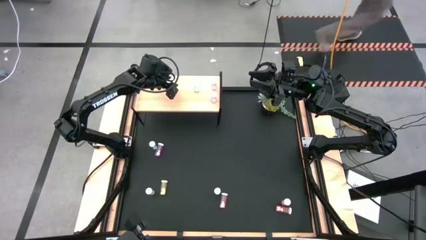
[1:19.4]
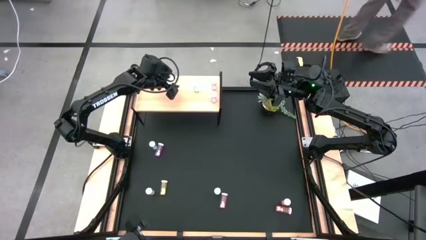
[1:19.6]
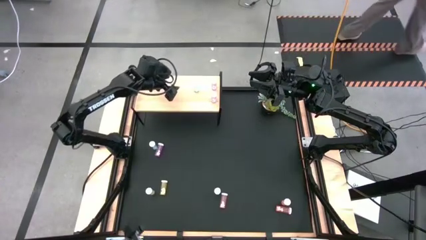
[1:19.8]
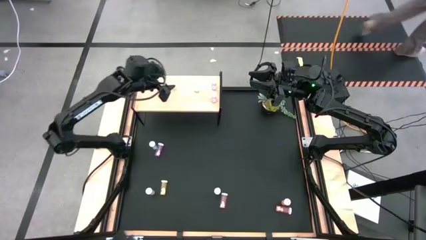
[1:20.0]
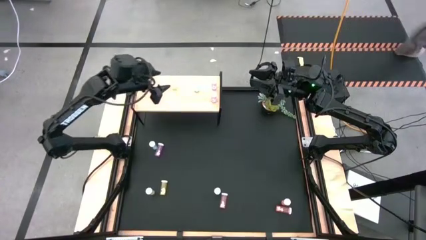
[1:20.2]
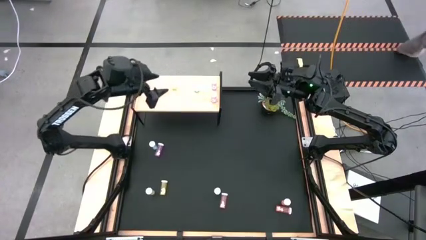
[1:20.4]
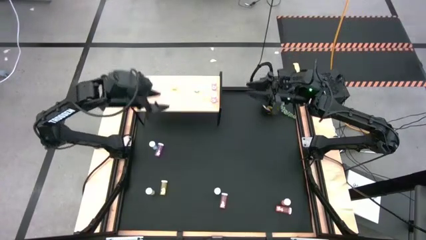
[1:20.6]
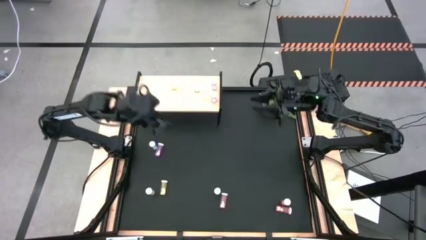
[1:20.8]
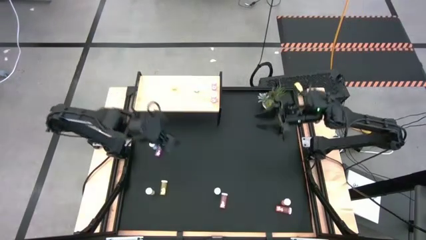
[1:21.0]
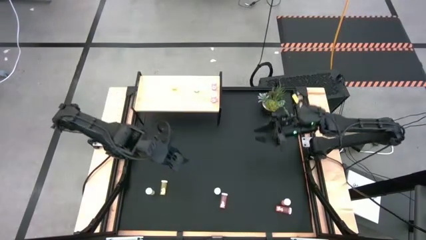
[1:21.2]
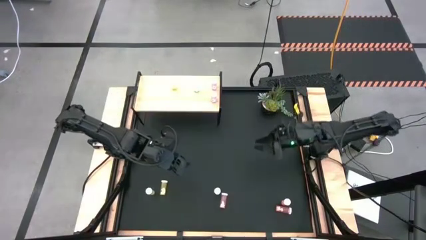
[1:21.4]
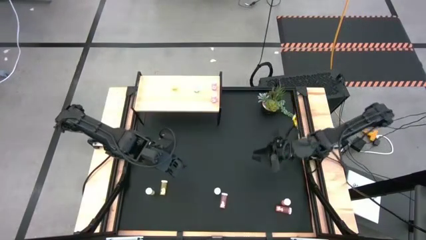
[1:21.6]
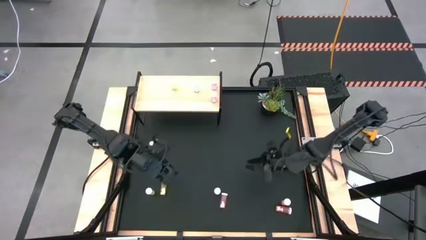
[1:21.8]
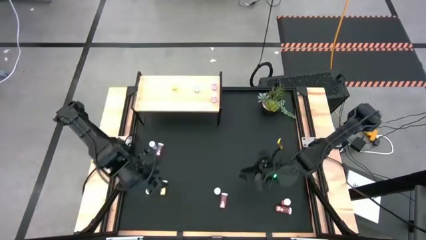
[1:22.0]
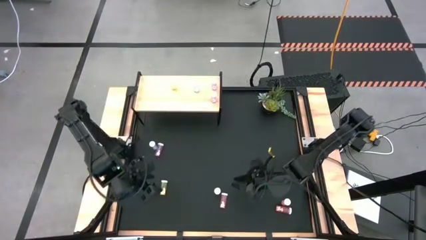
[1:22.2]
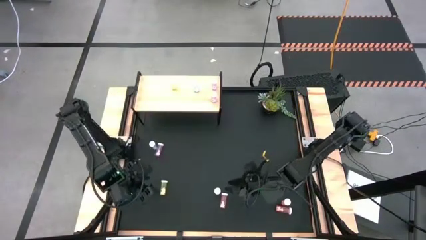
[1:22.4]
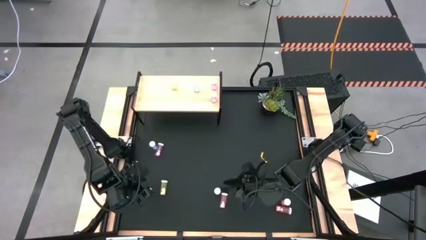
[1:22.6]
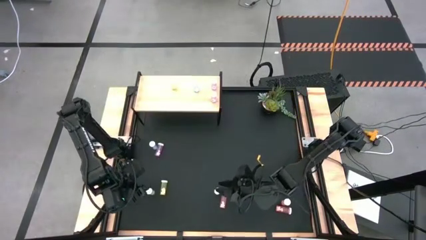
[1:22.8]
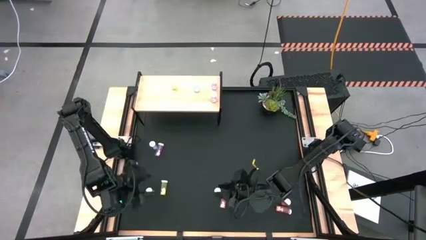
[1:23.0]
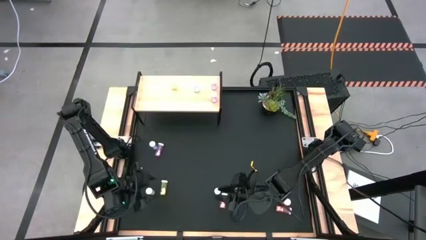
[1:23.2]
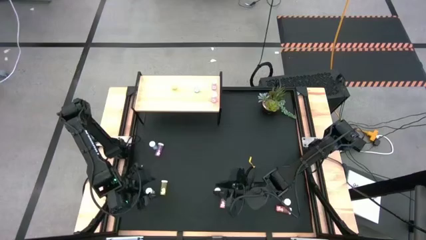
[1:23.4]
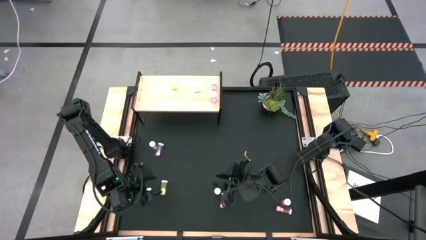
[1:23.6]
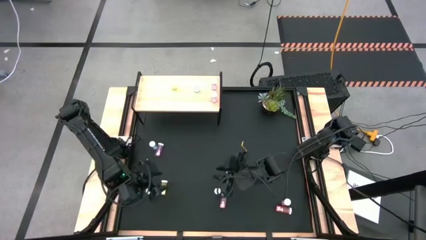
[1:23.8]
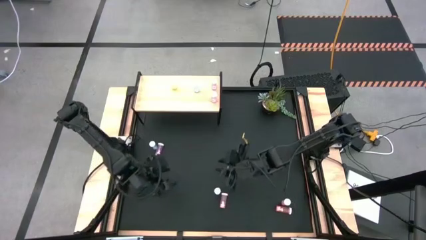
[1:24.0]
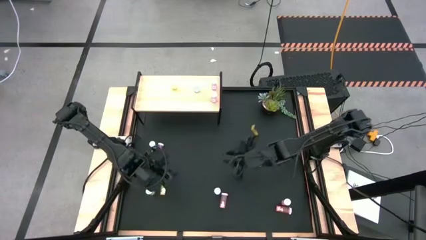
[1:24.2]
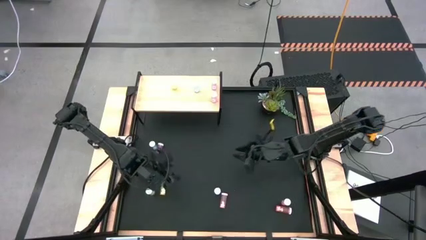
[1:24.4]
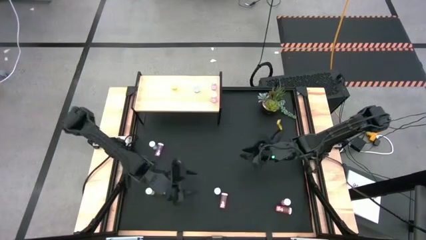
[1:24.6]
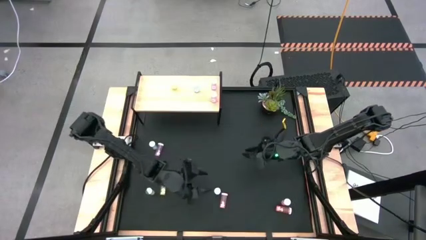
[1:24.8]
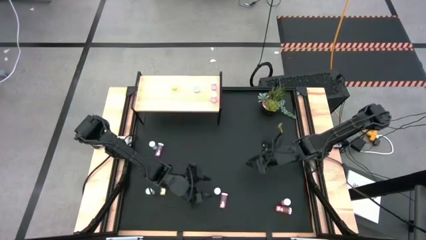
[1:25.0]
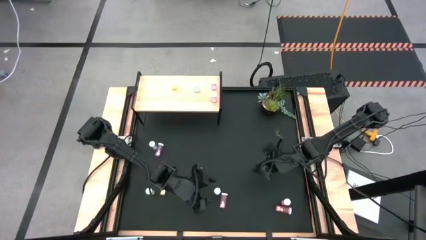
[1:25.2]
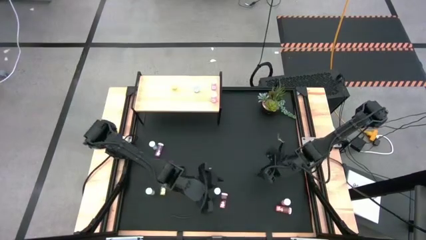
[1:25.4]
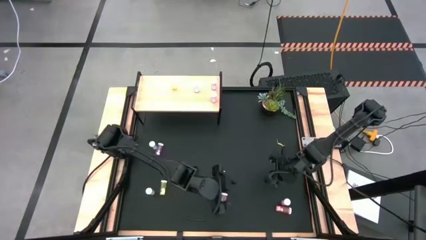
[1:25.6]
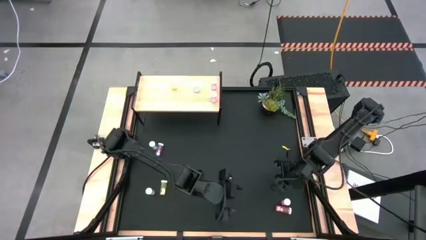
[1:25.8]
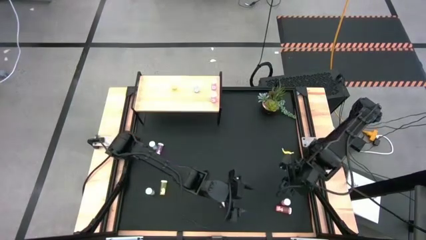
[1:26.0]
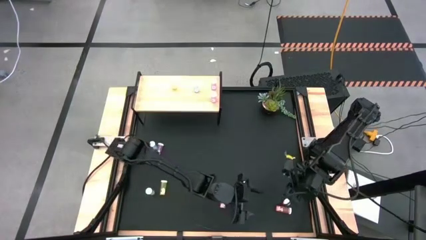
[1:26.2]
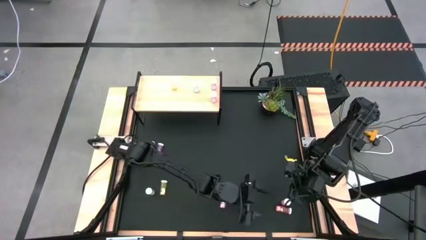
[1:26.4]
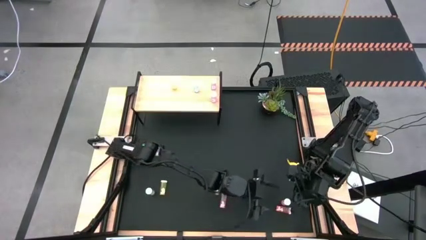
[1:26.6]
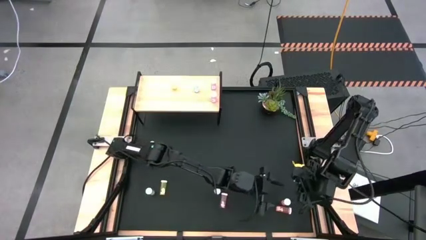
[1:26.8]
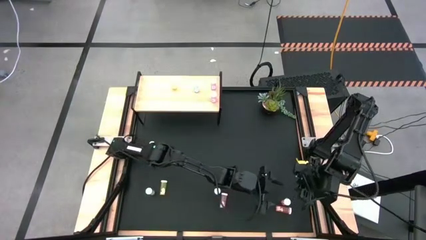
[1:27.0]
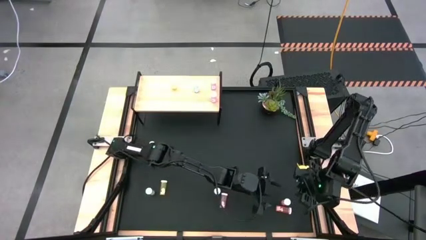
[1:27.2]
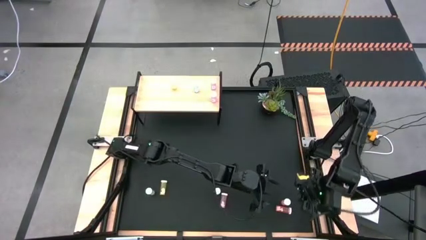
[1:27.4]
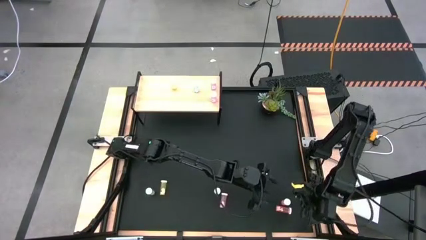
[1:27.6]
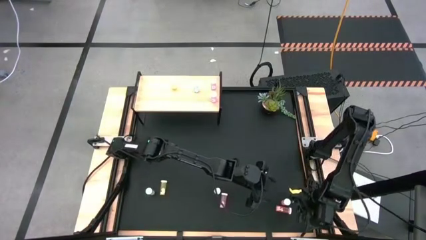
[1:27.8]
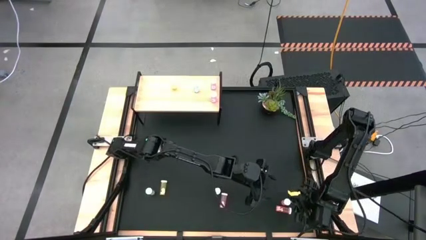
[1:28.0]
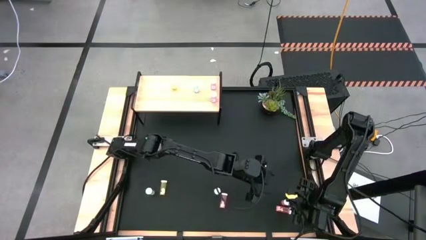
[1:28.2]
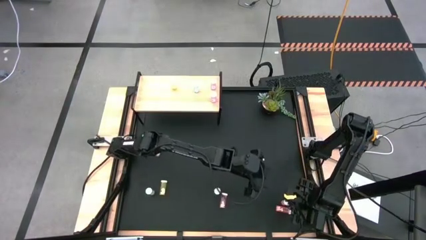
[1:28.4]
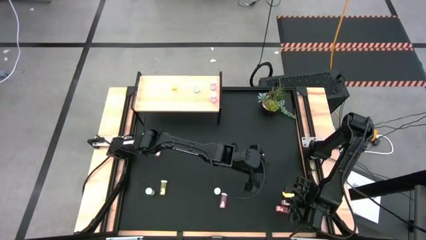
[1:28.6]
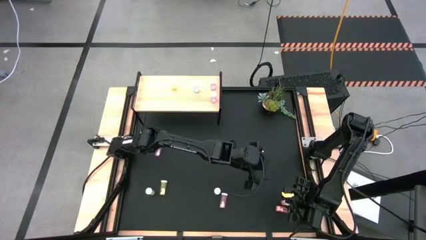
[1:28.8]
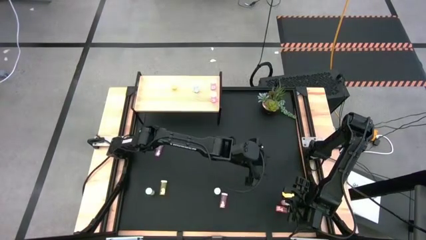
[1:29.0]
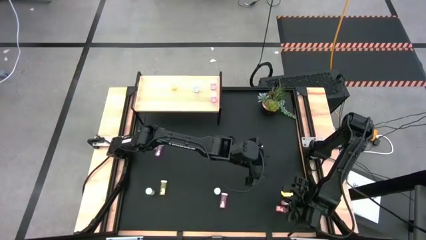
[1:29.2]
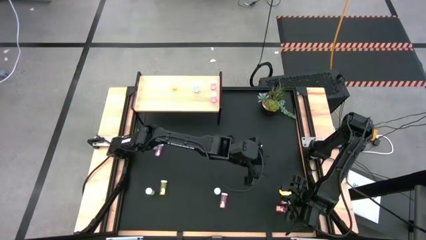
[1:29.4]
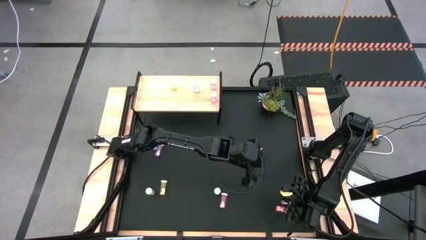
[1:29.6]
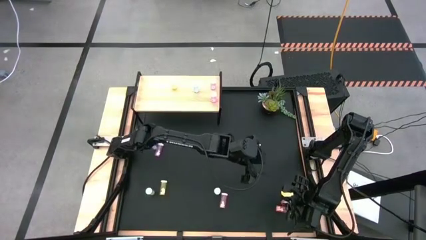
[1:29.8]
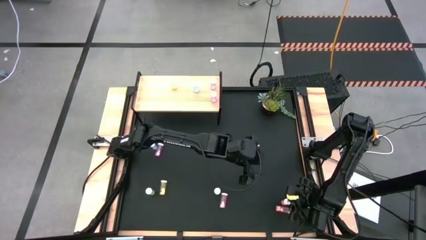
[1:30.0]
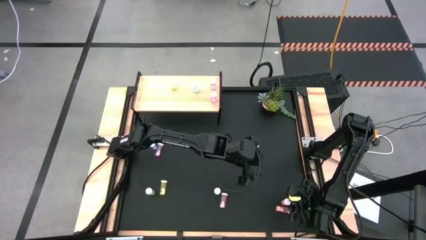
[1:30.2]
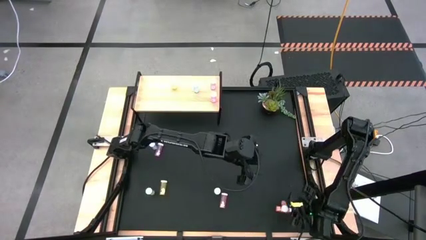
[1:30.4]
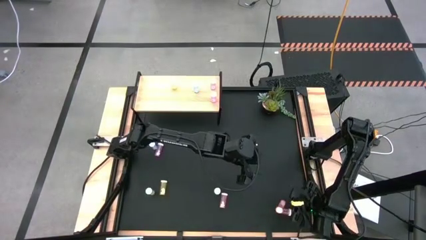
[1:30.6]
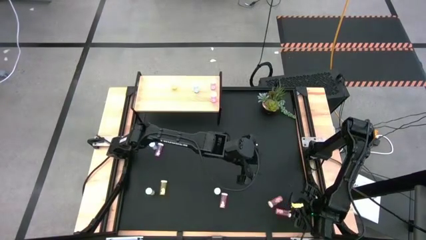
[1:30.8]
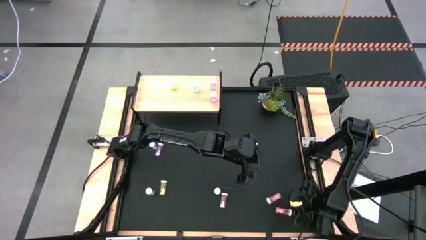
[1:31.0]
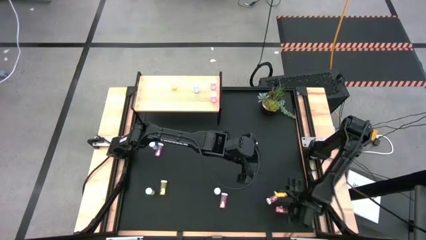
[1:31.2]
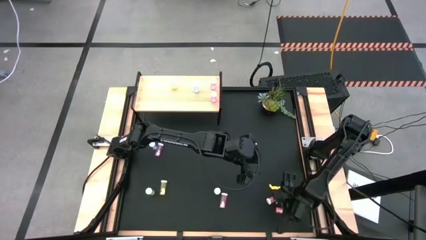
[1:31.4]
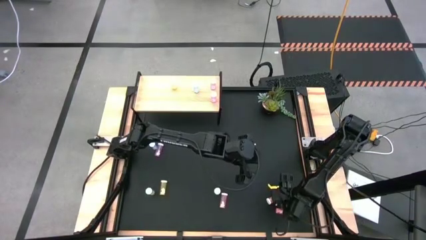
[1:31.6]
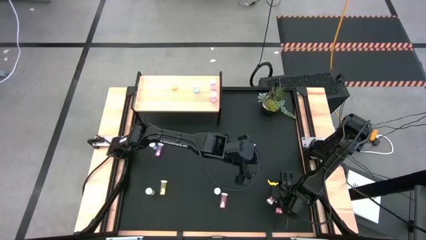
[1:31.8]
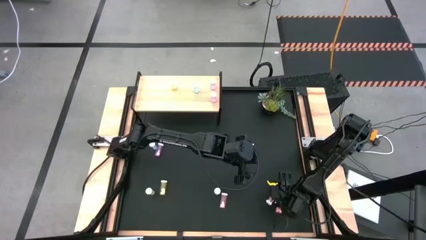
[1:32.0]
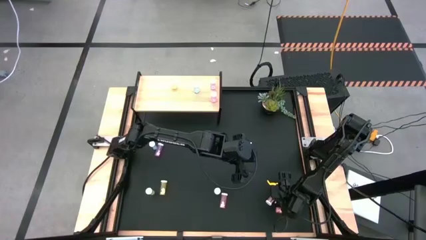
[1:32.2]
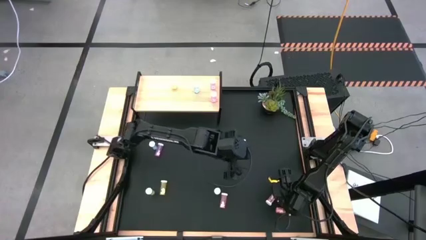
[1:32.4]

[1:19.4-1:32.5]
Task: Pick and place medicine bottles onto shelf by color
Put the top right orange pill bottle on the shelf

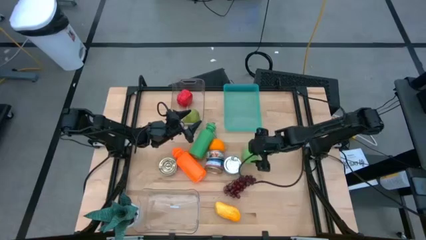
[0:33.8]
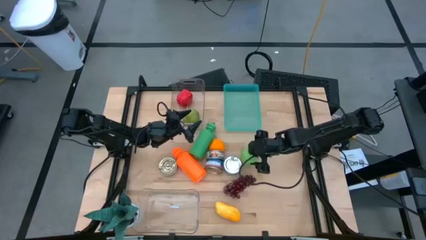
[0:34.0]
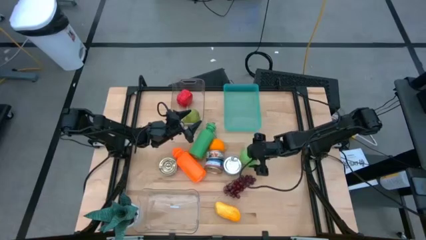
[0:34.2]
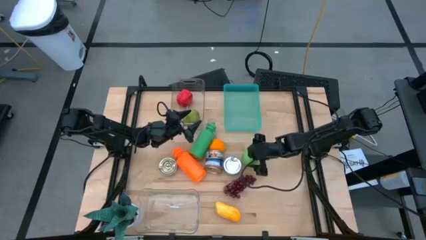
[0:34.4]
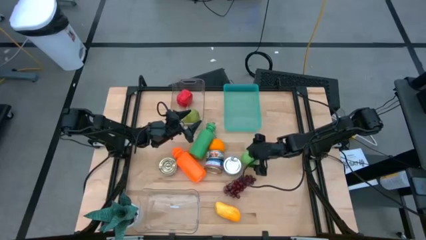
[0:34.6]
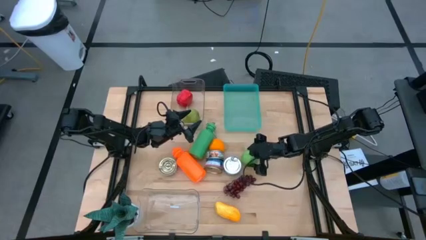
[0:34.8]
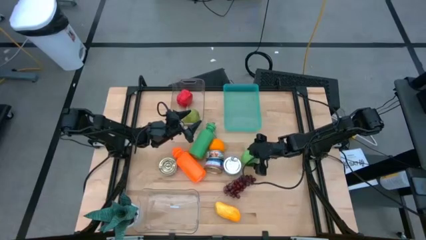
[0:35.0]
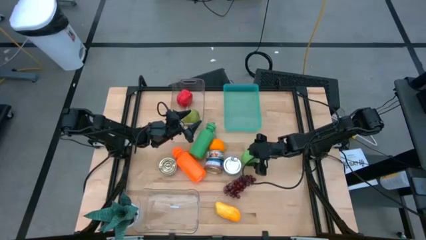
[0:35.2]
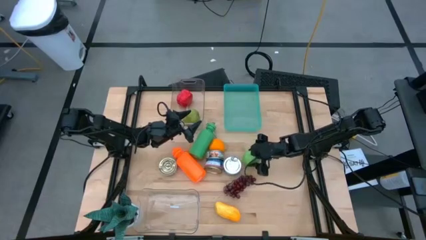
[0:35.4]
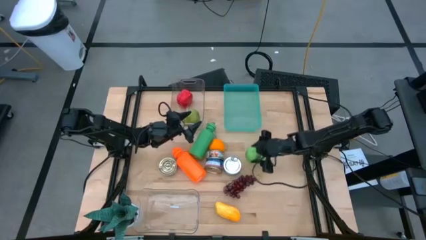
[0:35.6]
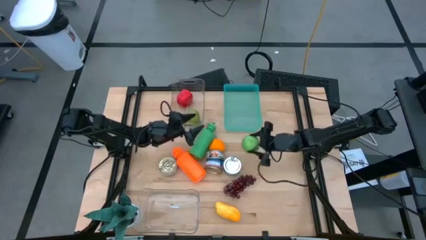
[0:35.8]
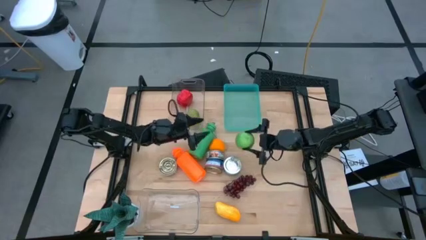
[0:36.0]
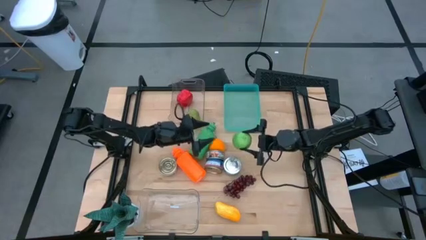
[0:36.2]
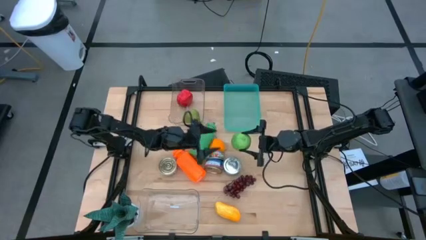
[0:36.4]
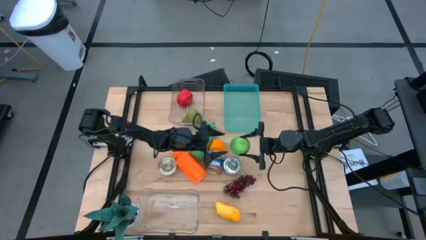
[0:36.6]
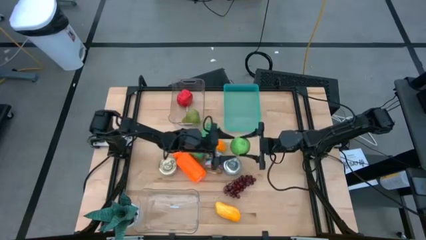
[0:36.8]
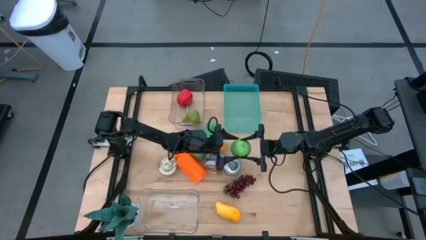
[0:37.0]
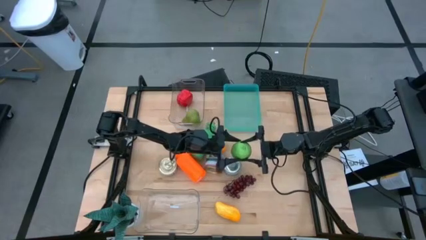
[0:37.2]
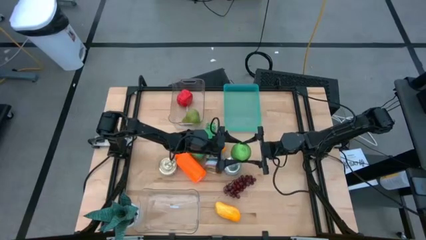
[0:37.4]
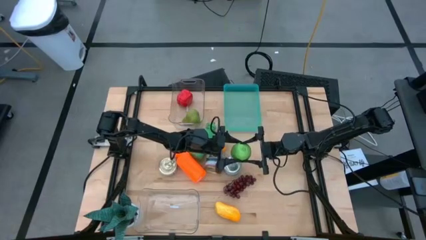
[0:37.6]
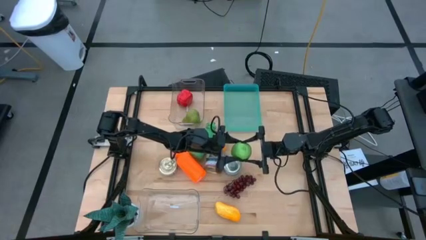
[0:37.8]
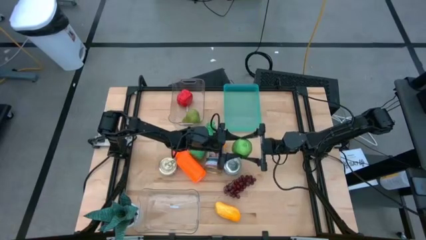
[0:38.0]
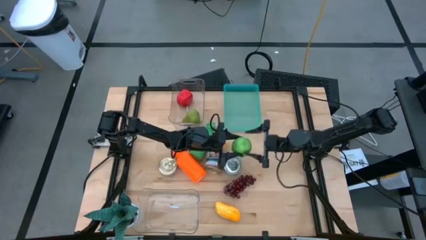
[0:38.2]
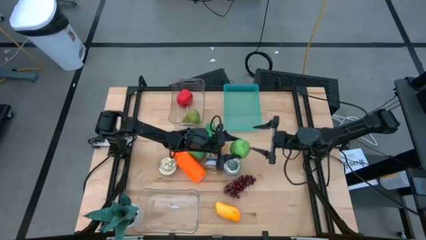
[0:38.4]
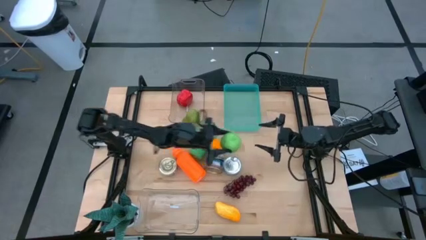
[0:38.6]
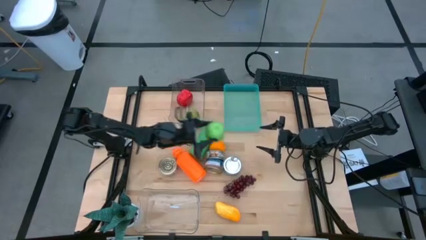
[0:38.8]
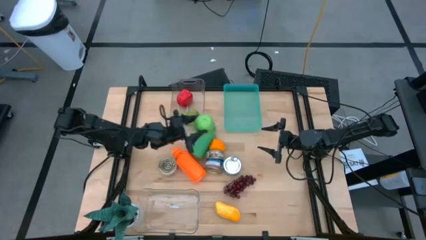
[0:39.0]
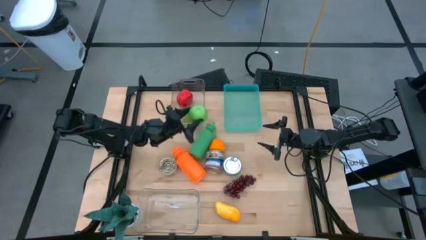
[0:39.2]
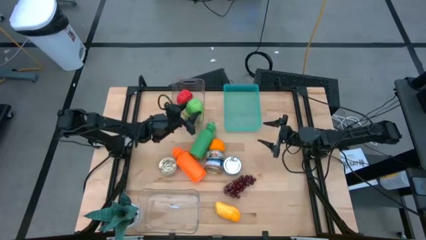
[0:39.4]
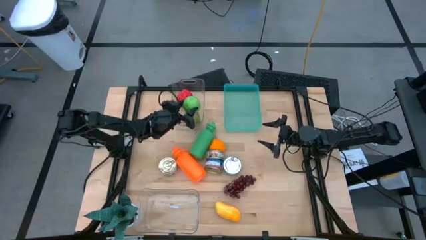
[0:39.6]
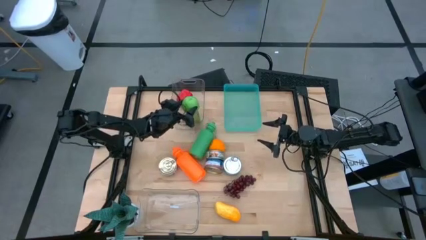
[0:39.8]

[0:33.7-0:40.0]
Task: Pick & Place Food Item
Put the green apple into the top transparent bin
